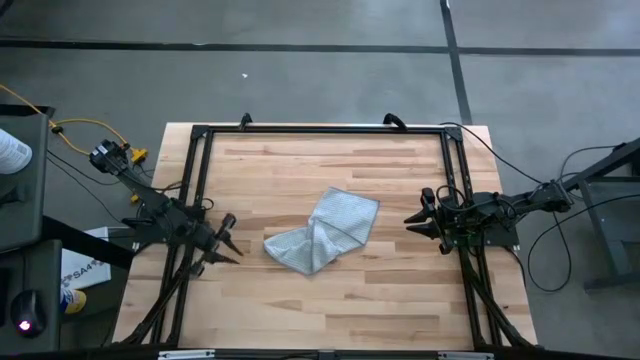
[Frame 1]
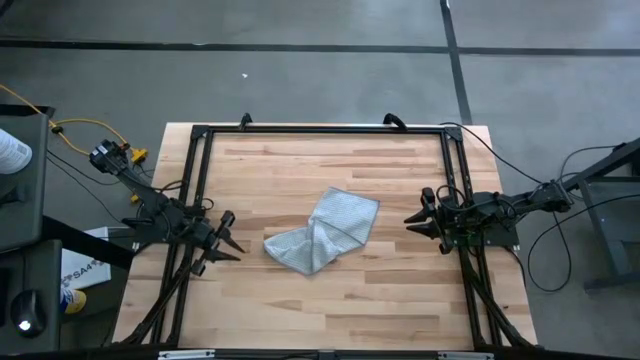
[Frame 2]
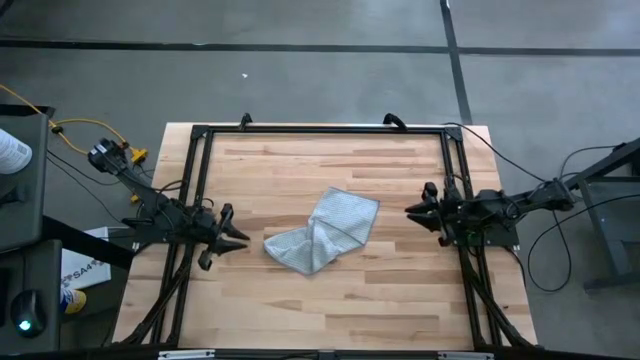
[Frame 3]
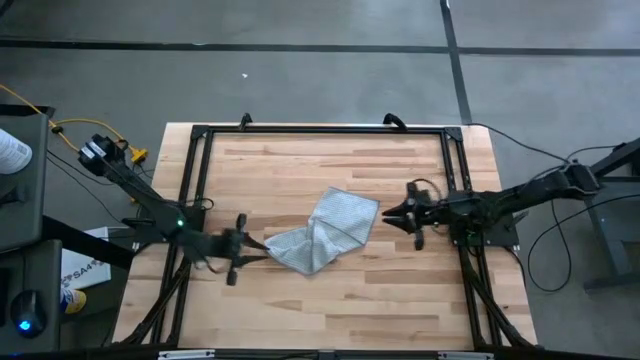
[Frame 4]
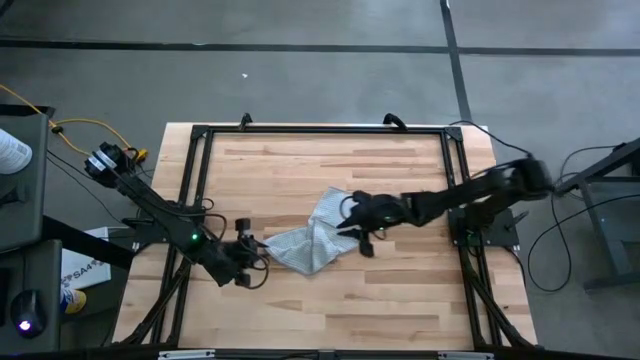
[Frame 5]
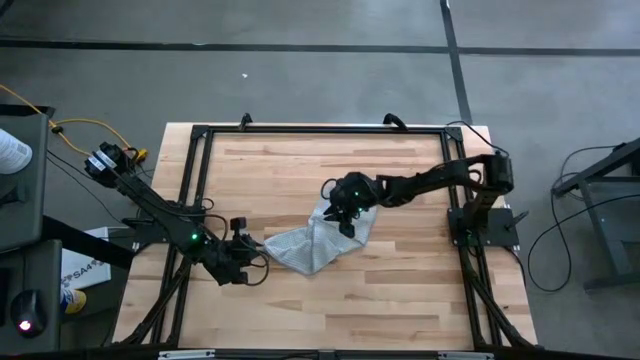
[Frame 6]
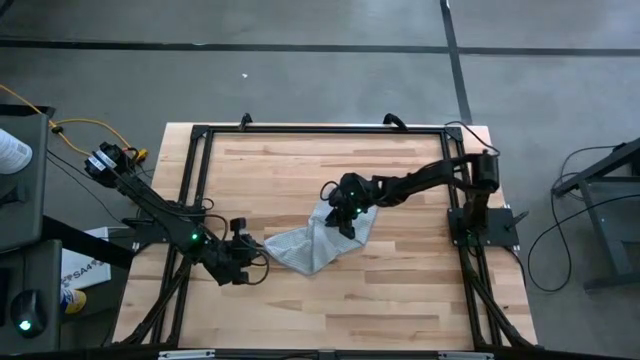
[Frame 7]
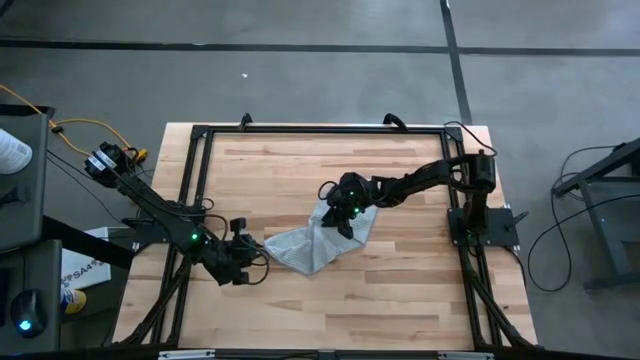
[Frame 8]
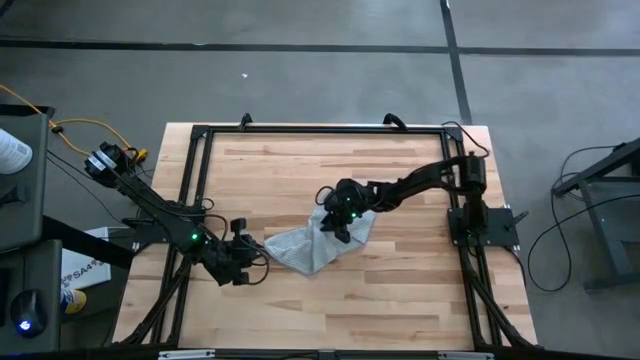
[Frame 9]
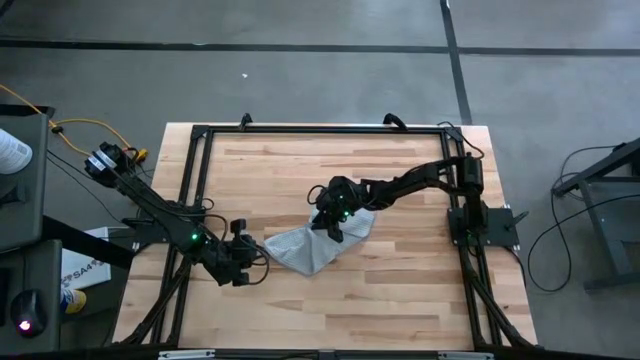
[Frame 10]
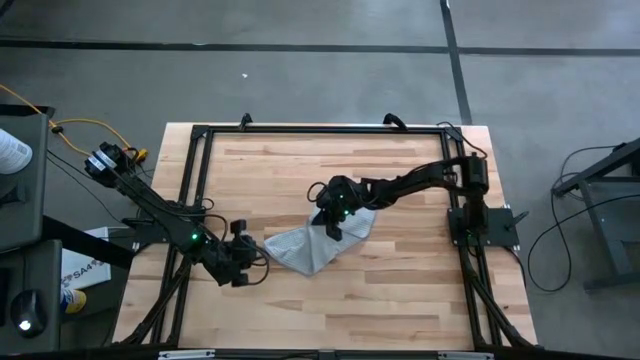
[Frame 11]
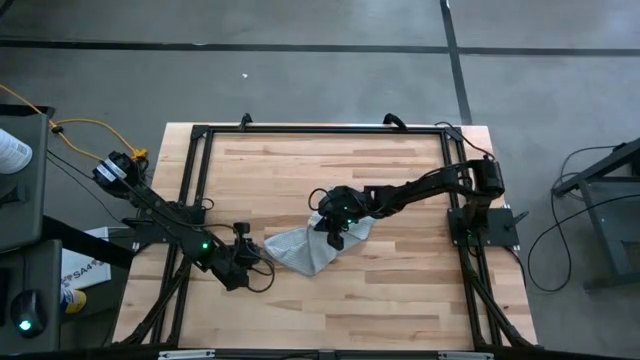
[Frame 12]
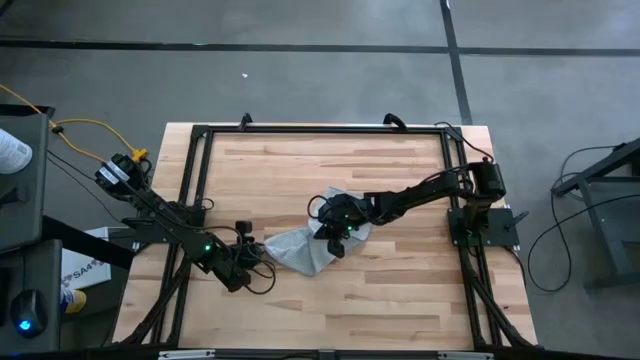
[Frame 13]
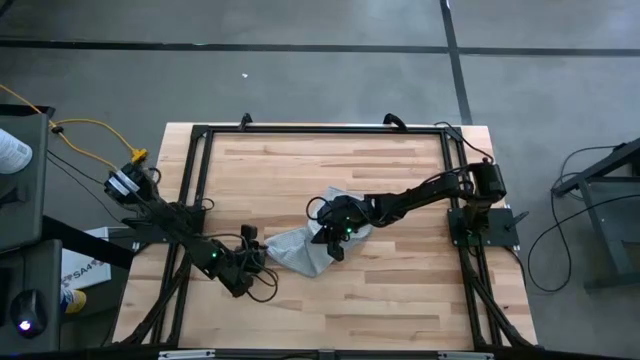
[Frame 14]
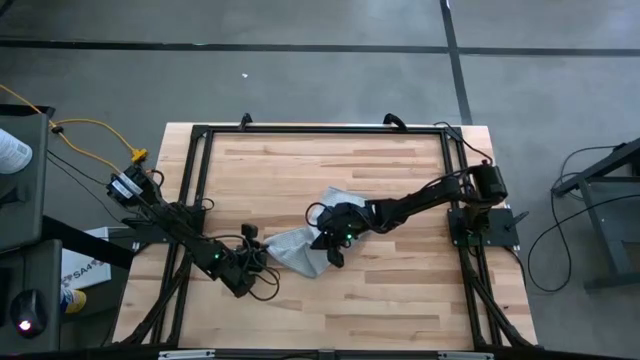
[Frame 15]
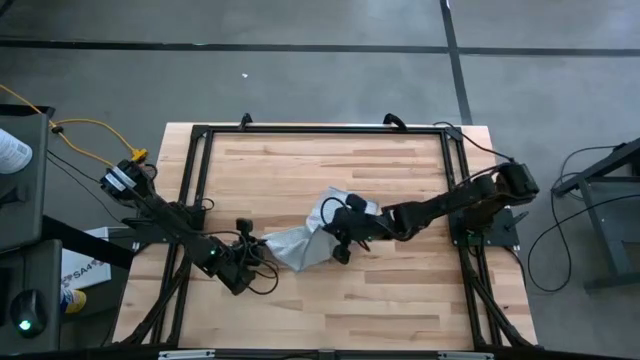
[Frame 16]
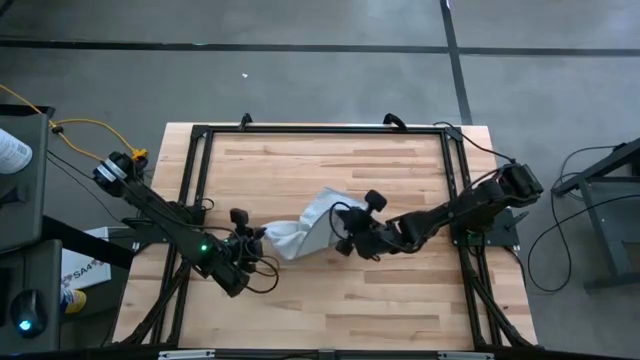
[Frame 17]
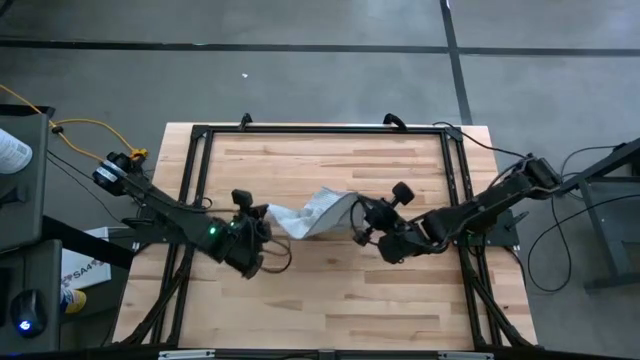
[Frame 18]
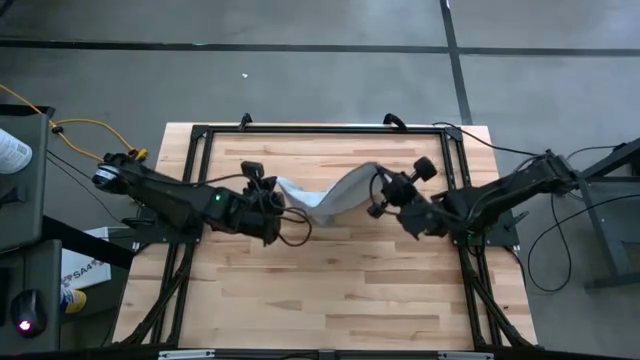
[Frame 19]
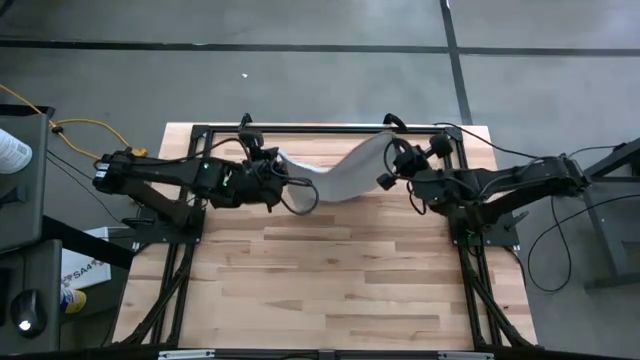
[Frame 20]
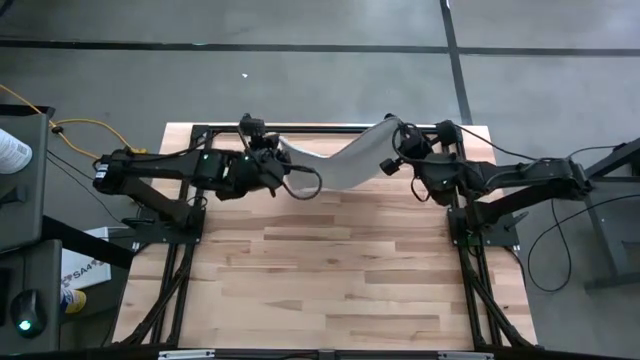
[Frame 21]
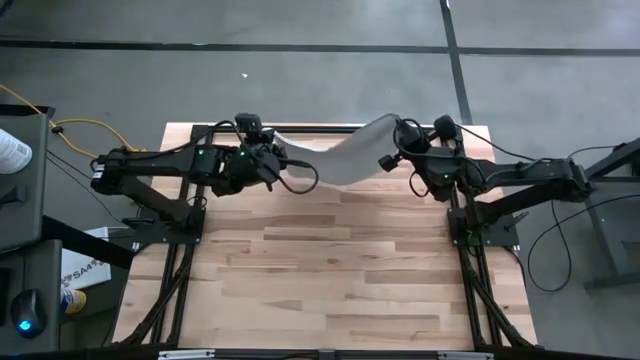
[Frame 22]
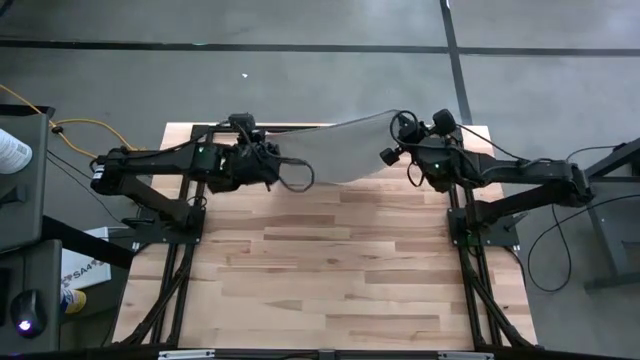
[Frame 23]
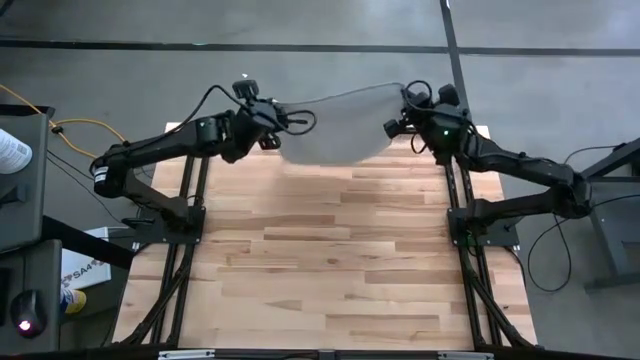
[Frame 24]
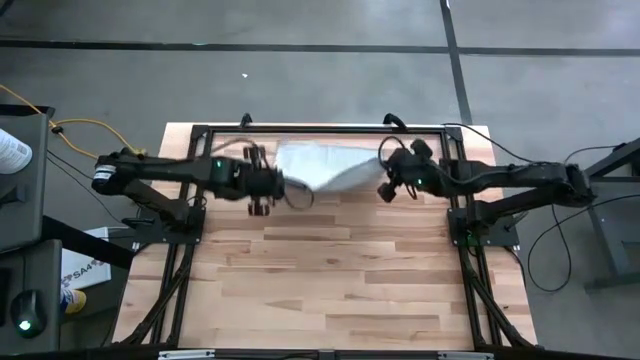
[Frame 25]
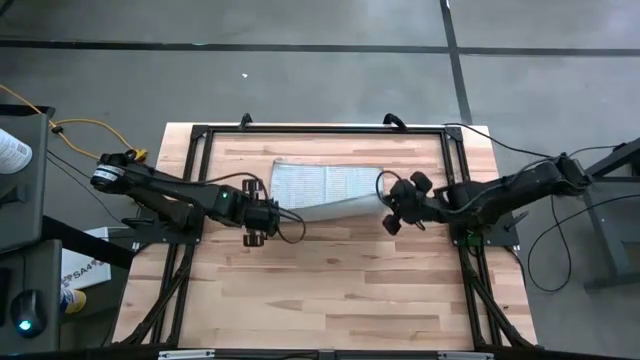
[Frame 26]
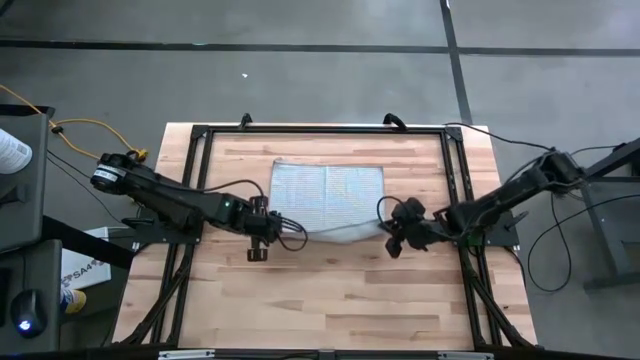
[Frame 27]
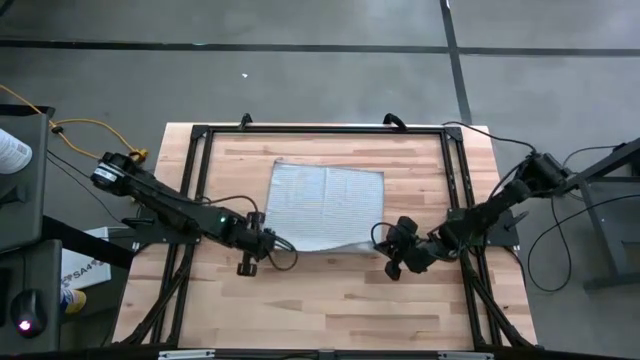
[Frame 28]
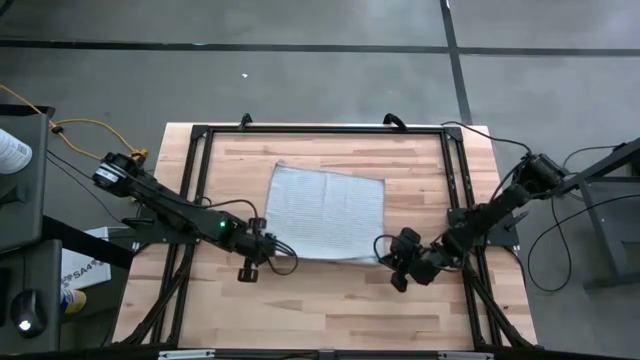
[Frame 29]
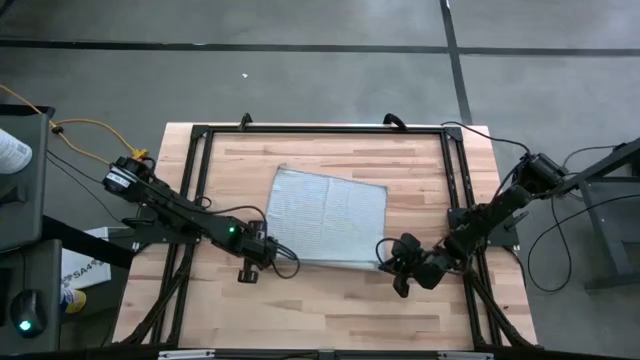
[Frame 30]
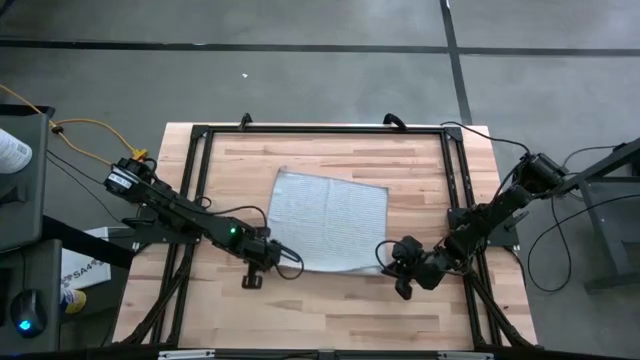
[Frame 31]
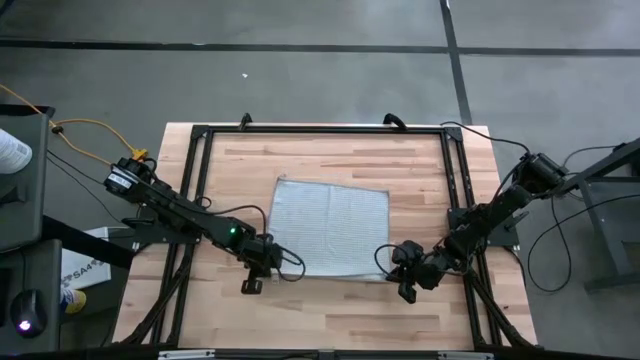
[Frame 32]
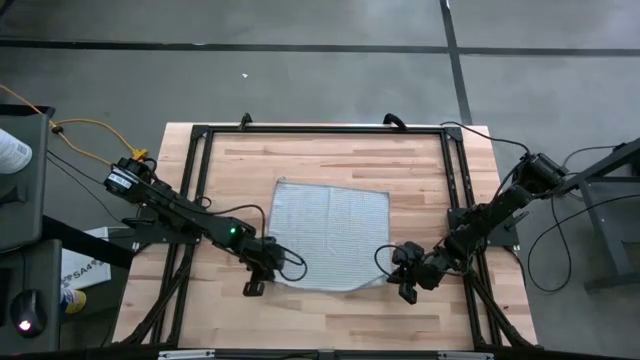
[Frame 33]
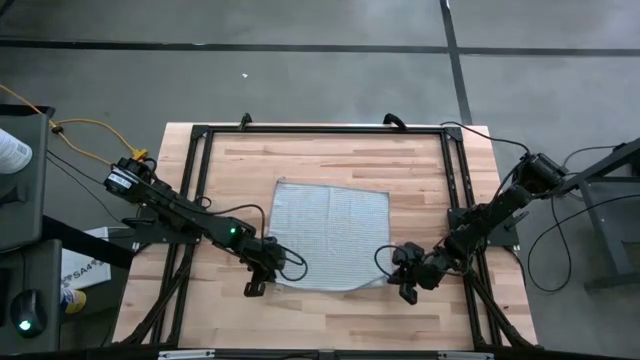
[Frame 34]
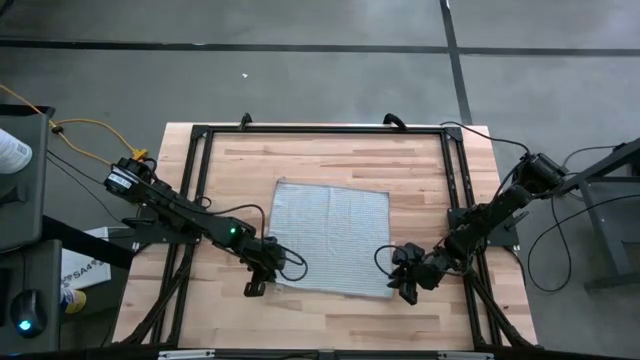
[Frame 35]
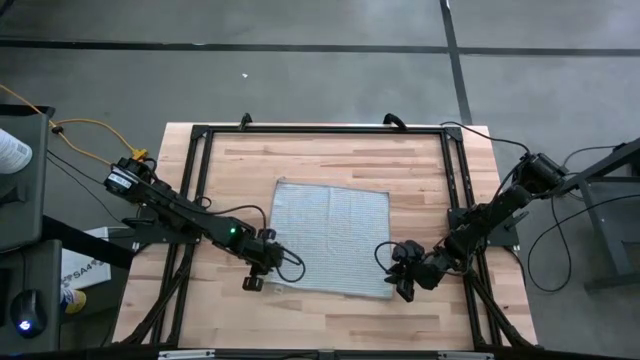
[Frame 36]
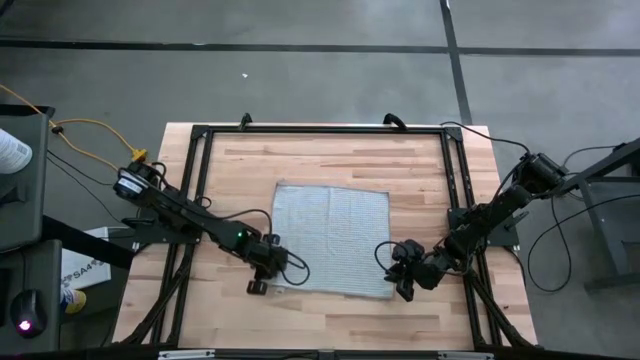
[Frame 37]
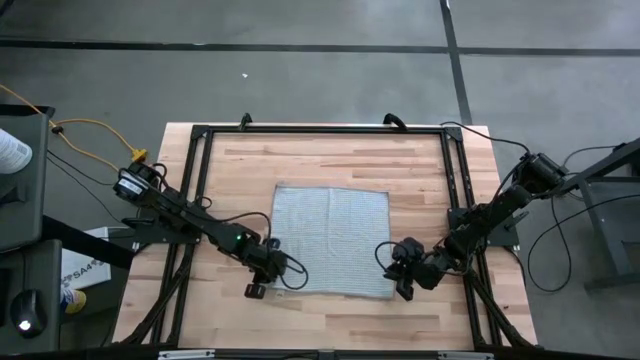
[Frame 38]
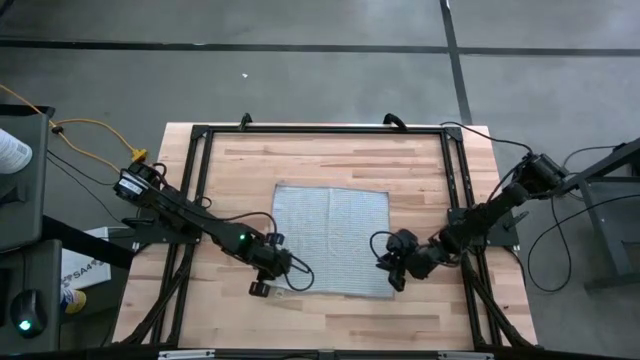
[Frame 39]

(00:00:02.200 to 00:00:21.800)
Task: Fold microfiber towels
Fold the grey towel
